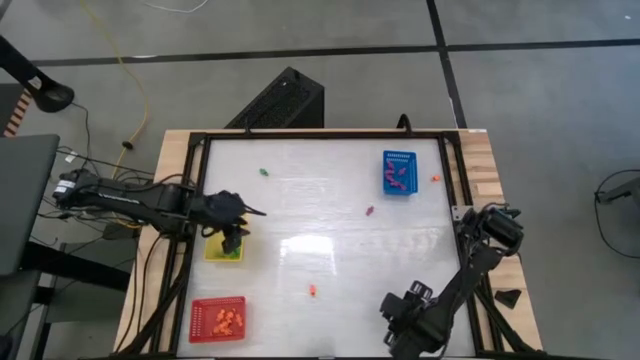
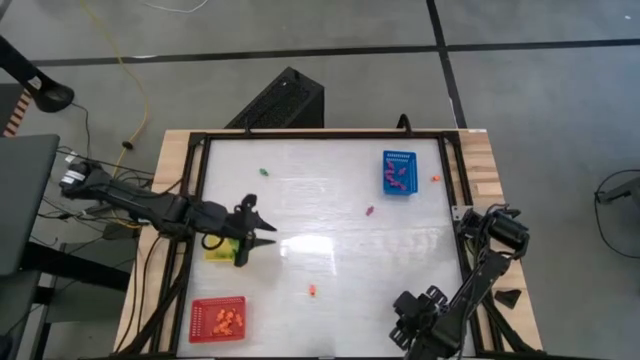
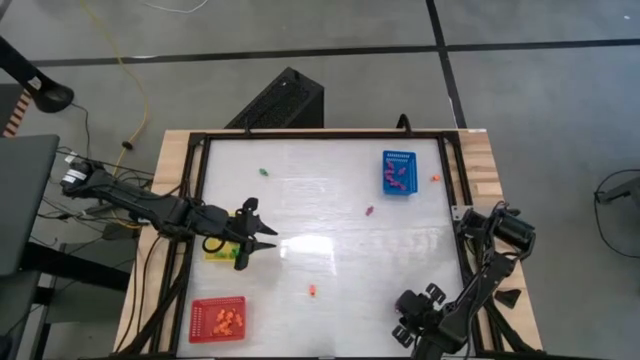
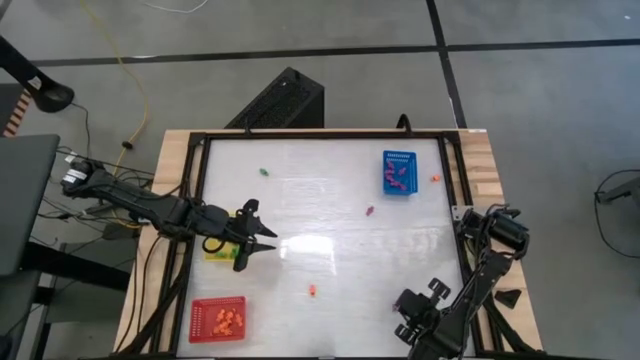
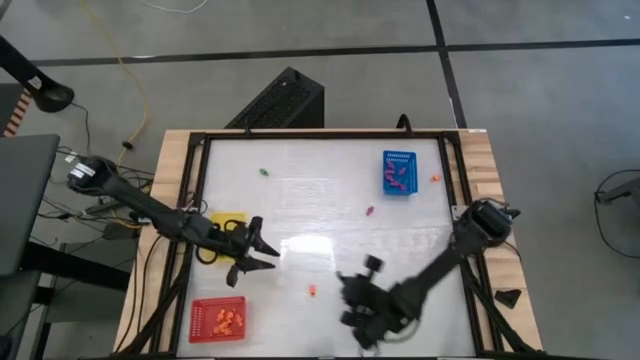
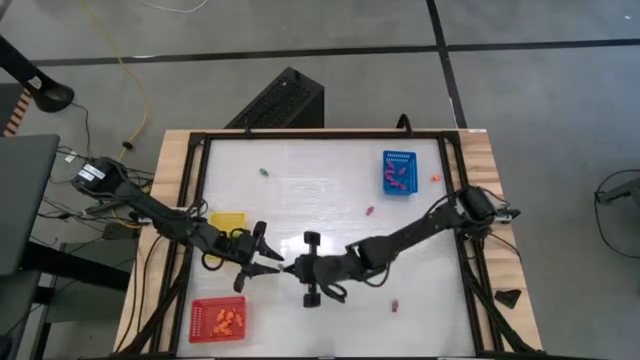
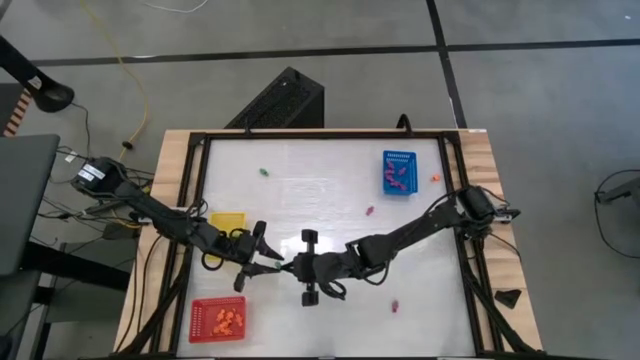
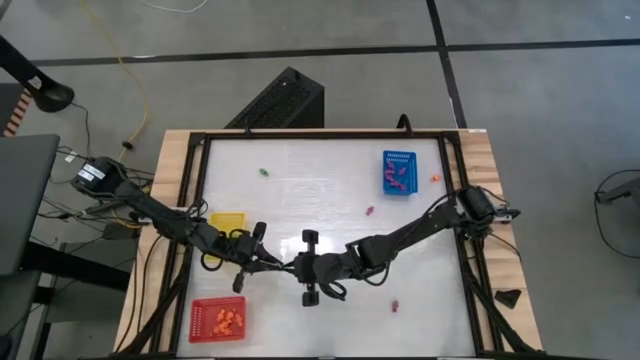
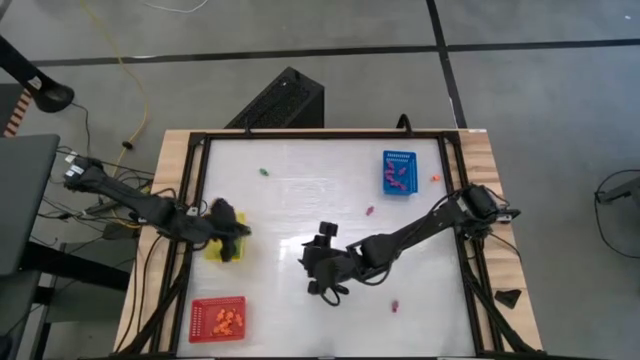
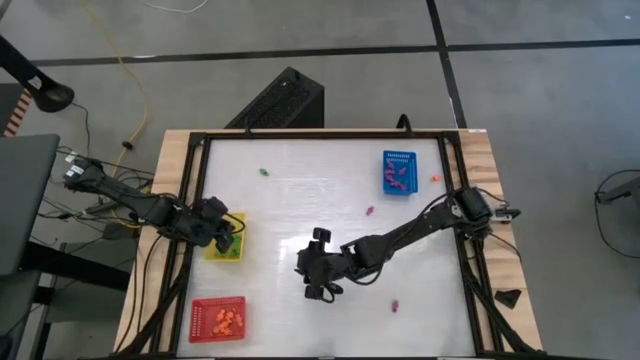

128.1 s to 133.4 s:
Task: Sort Halloween decoration
Put the green skeleton toy into the yellow bin

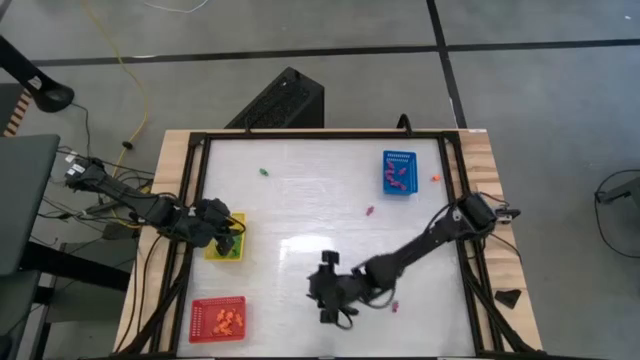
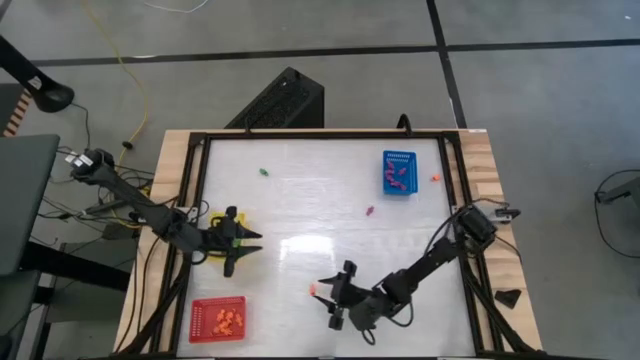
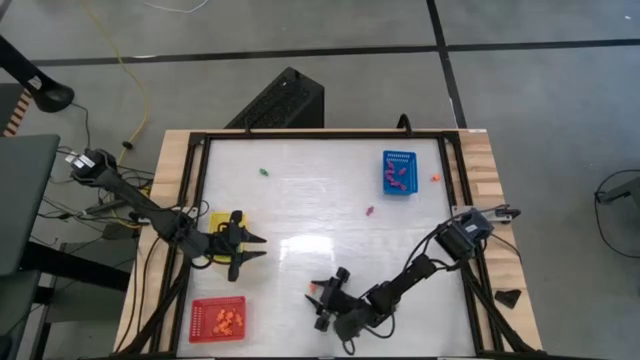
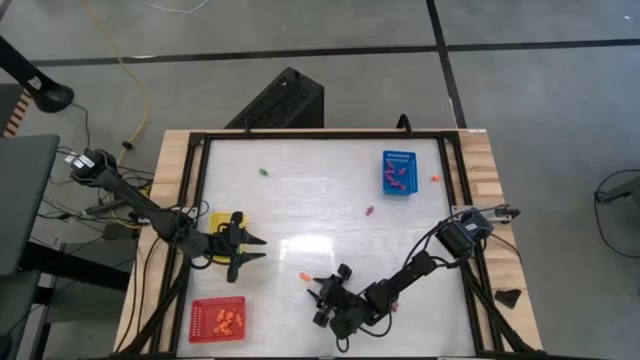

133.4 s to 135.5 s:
Put the orange skeleton toy into the red bin

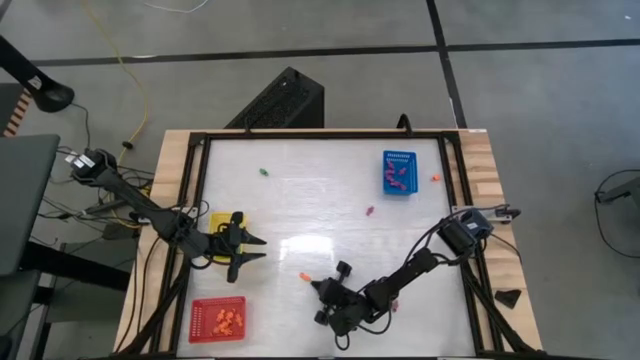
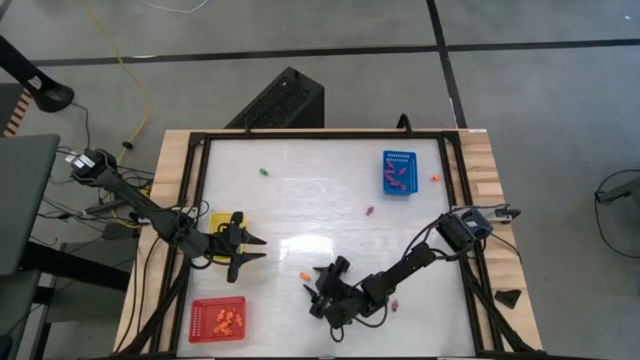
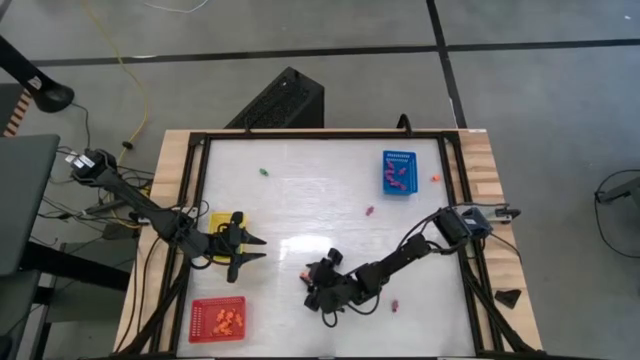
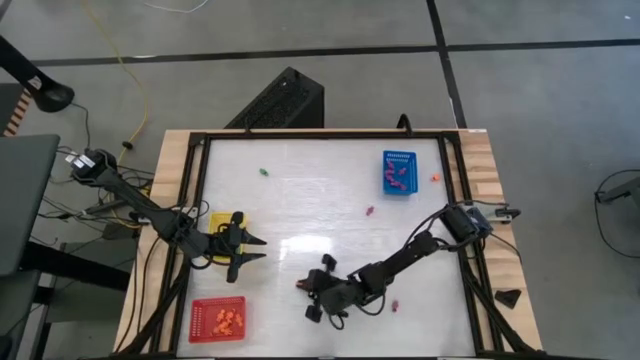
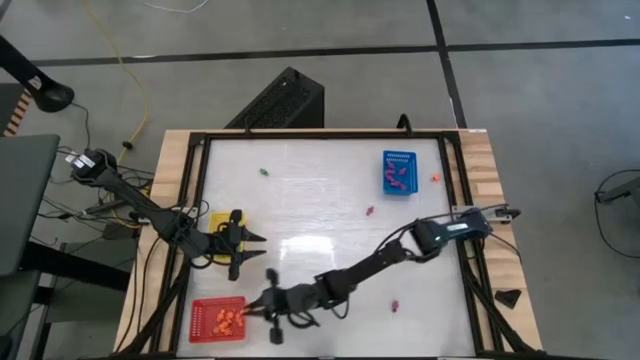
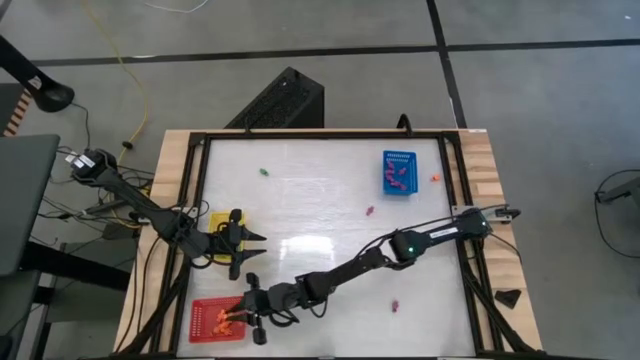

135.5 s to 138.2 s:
Put the orange skeleton toy into the red bin

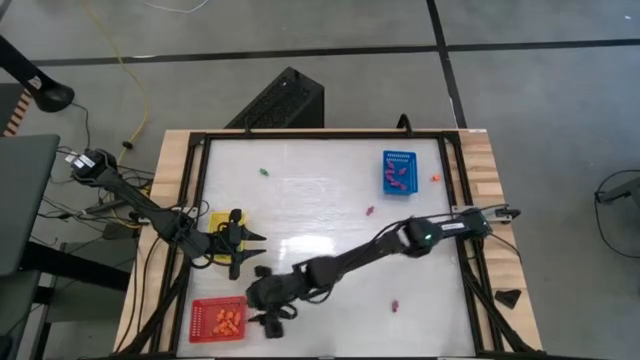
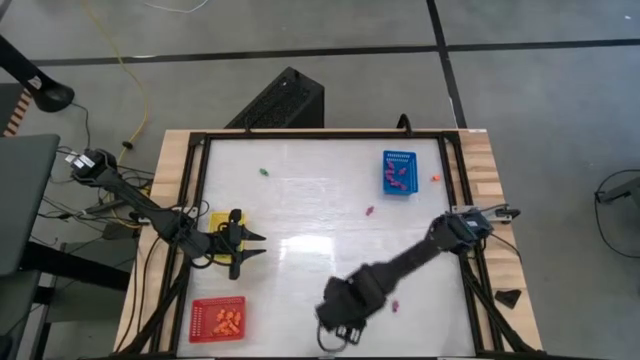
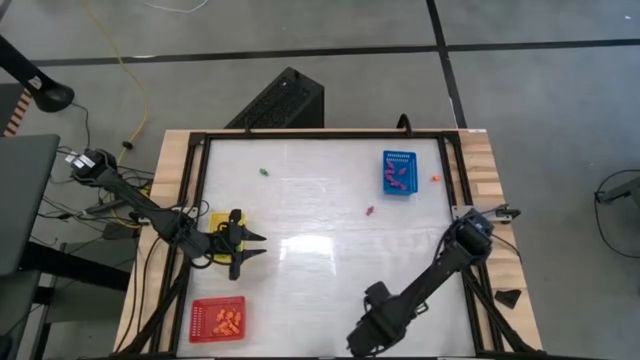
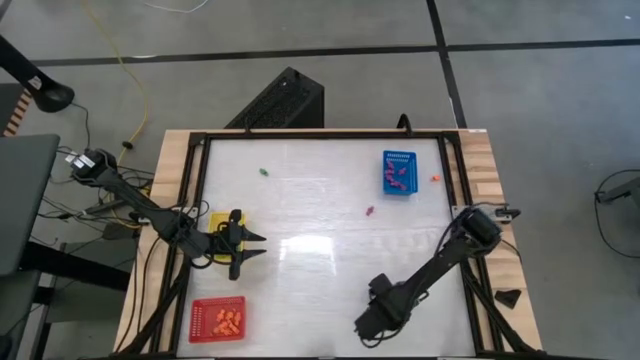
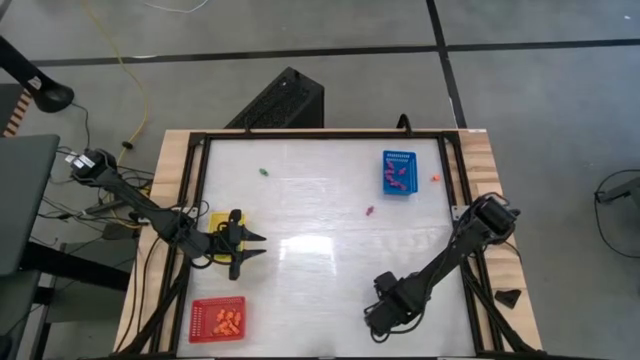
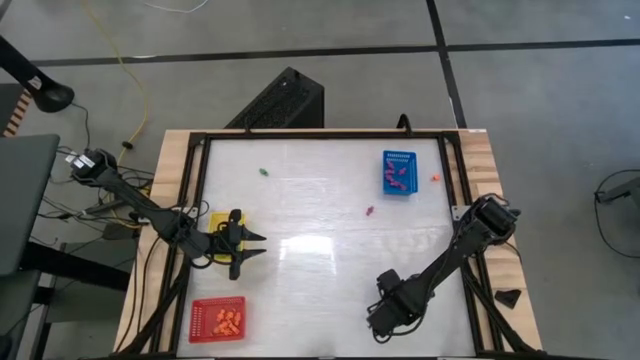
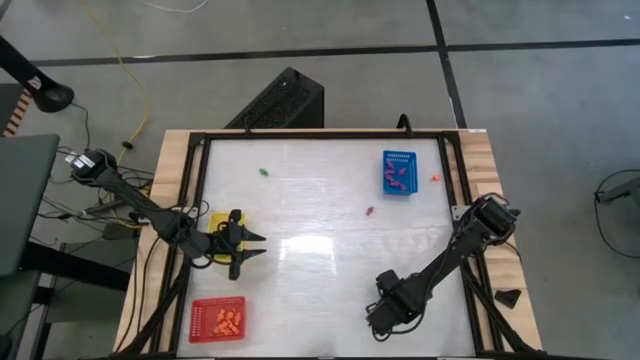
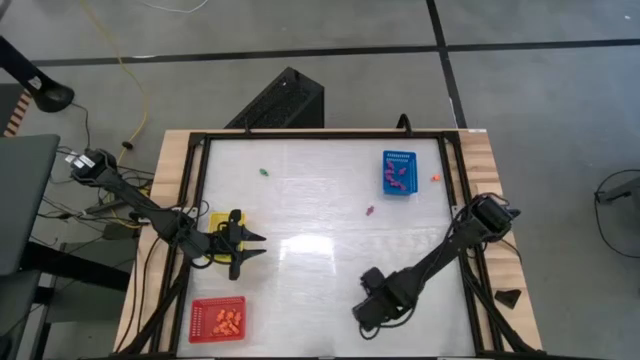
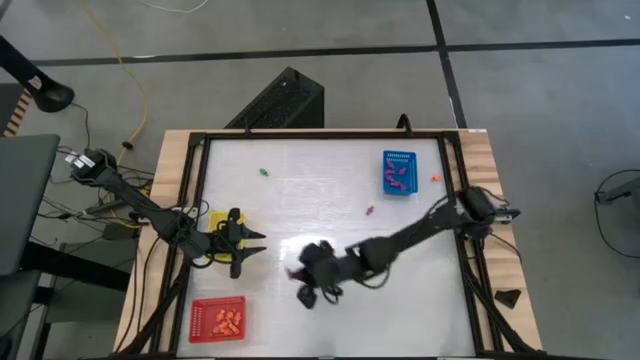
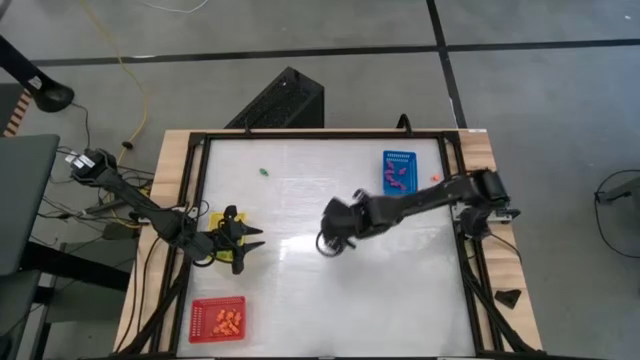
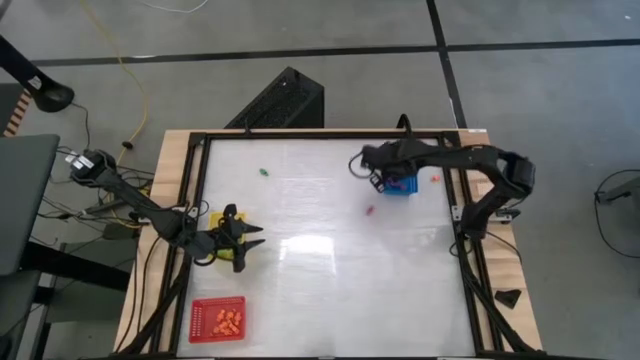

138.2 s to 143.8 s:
Put the purple skeleton toy into the blue bin

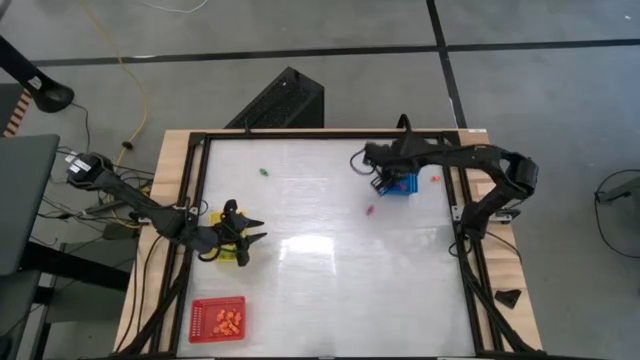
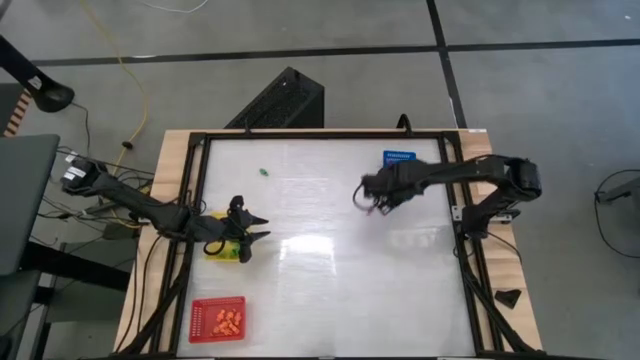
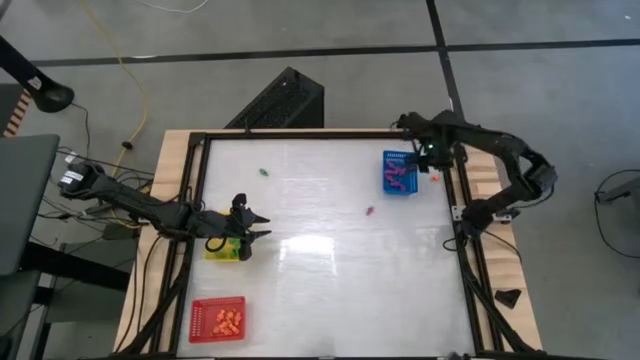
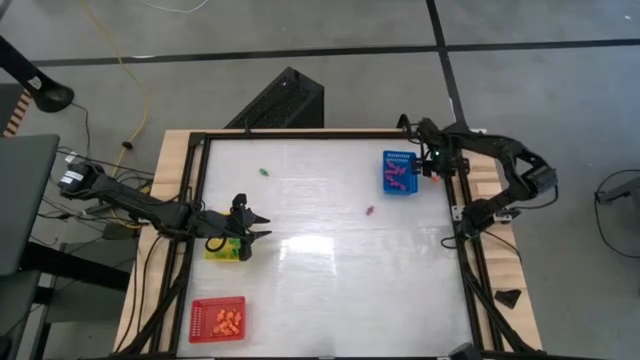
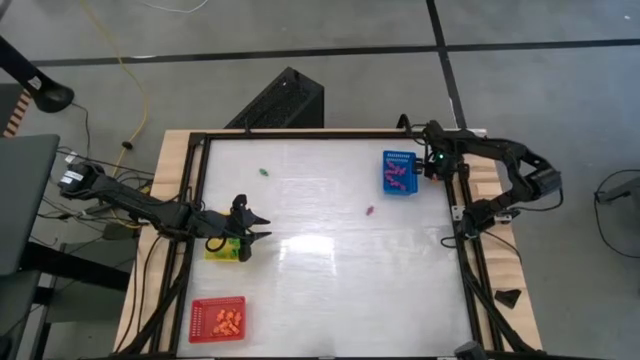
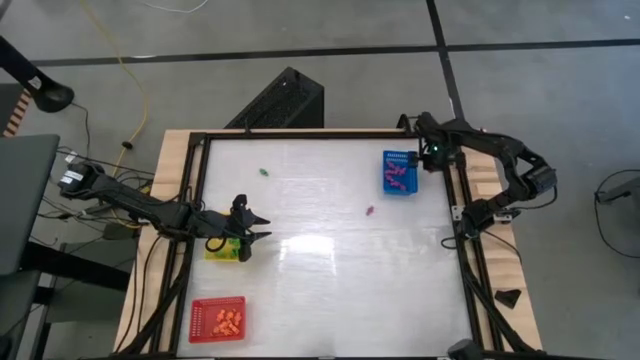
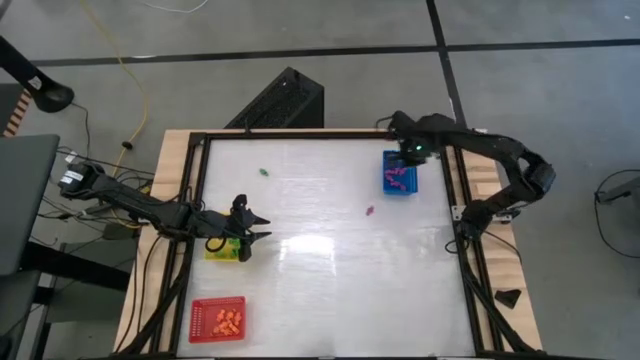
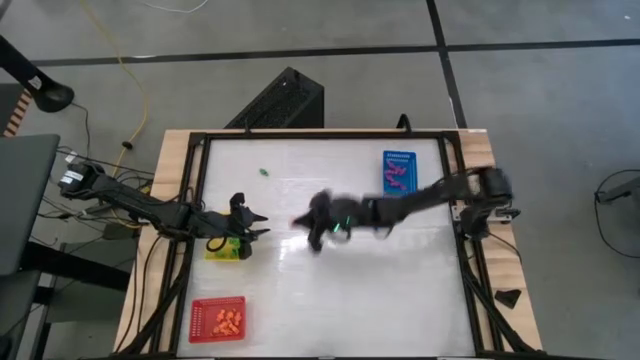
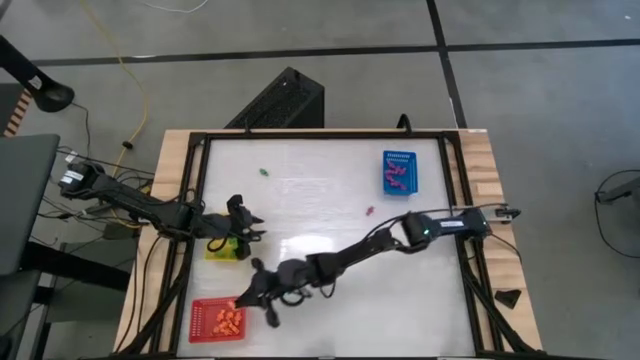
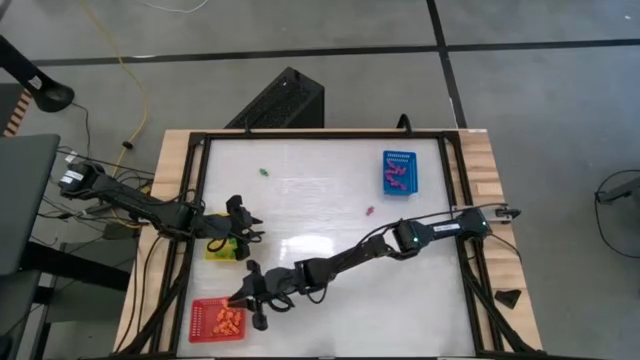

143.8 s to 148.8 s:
Put the orange skeleton toy into the red bin
